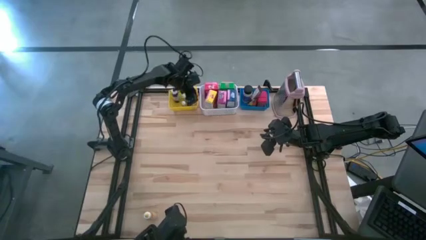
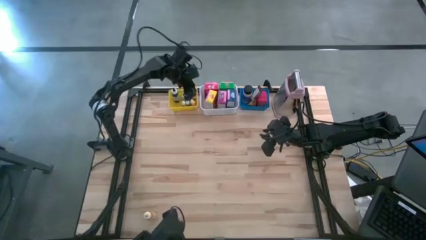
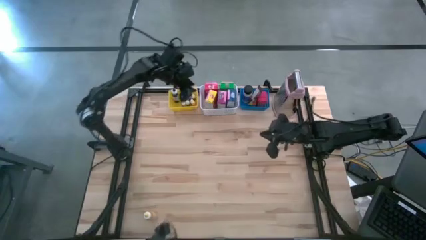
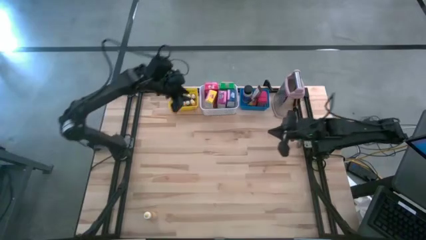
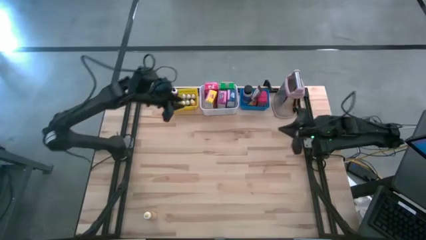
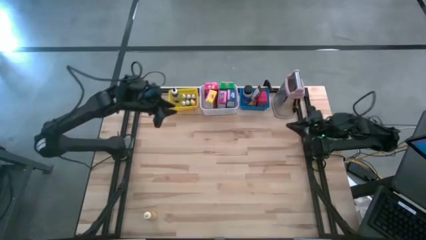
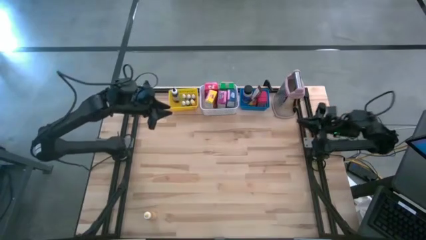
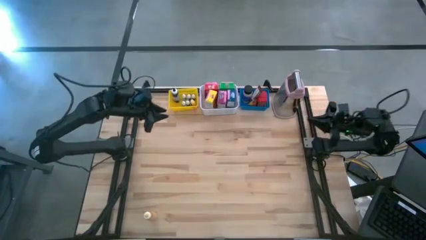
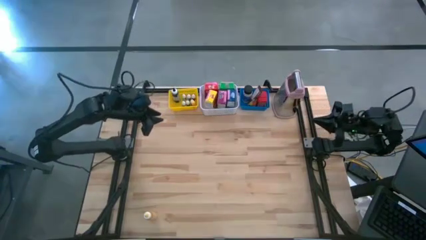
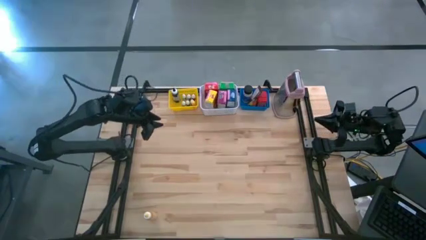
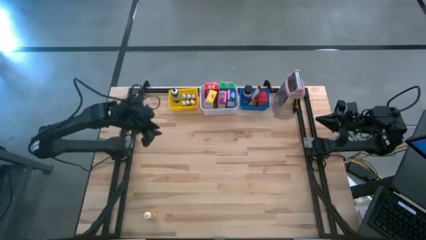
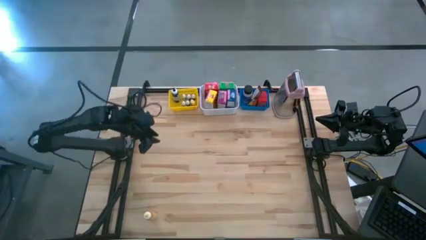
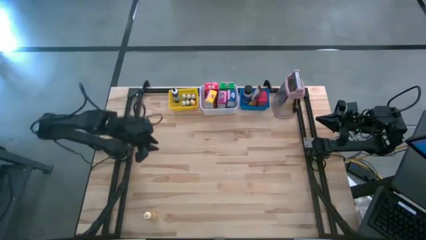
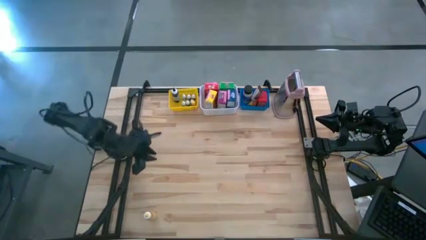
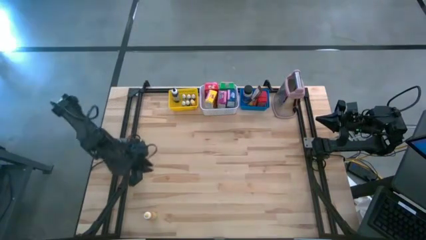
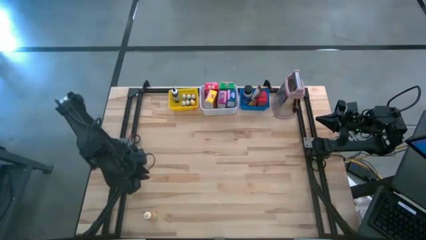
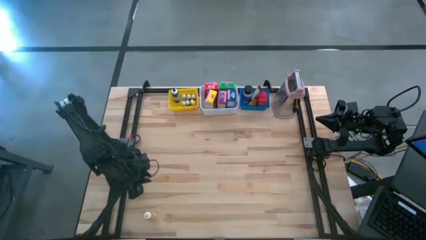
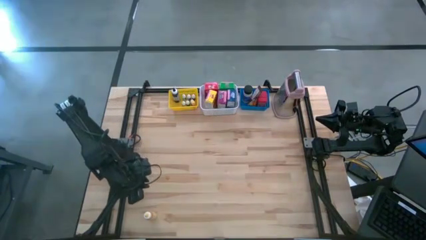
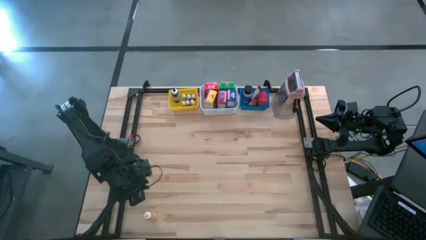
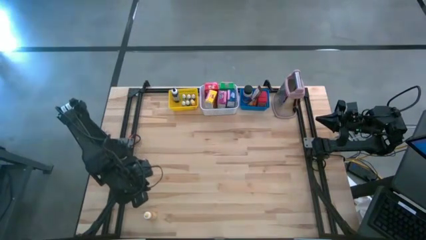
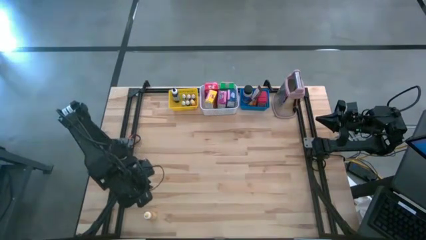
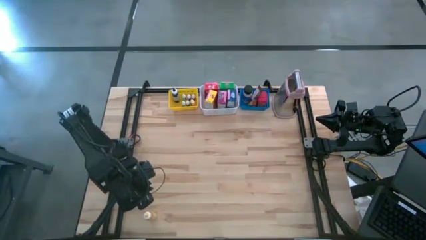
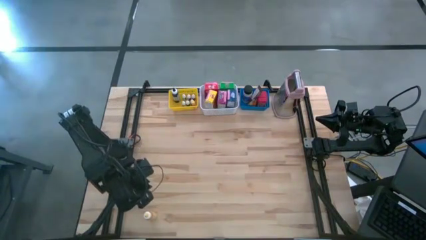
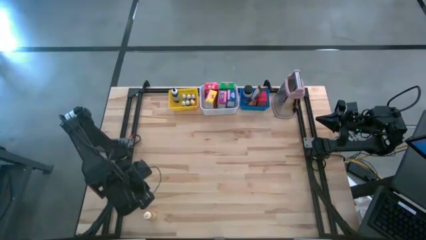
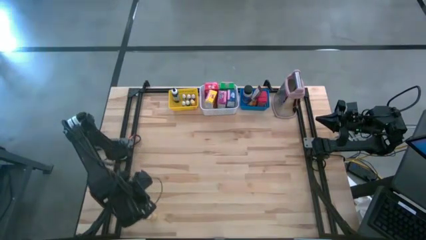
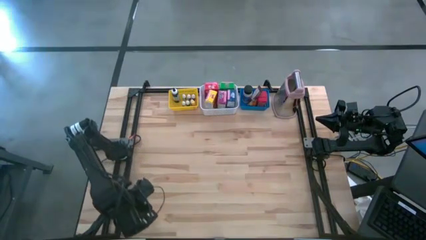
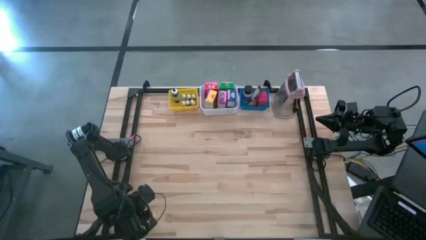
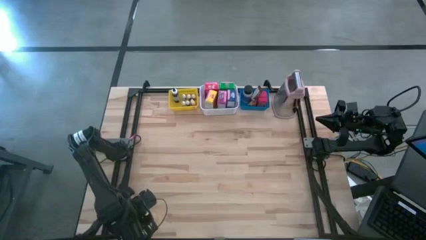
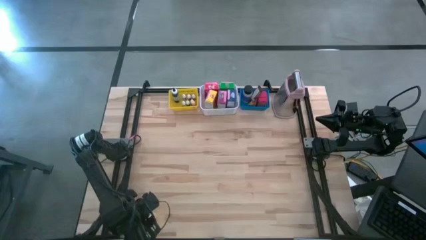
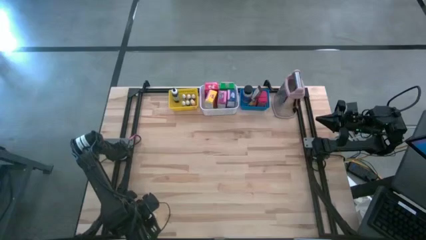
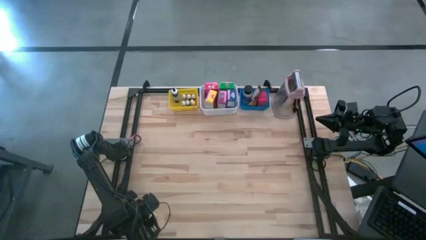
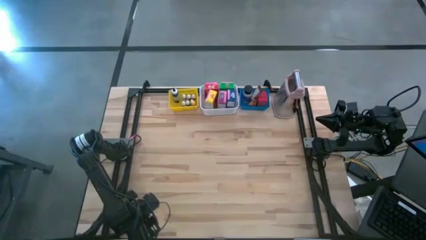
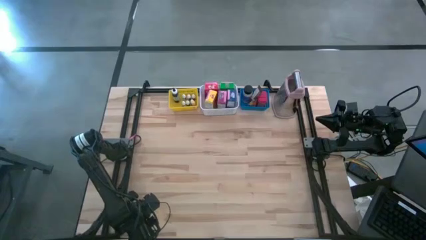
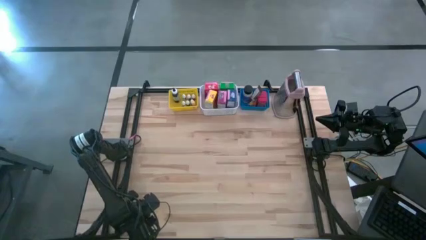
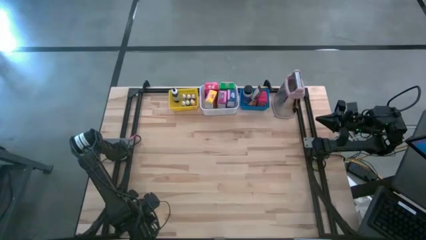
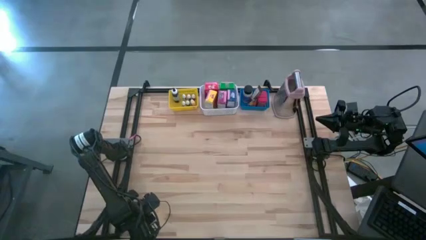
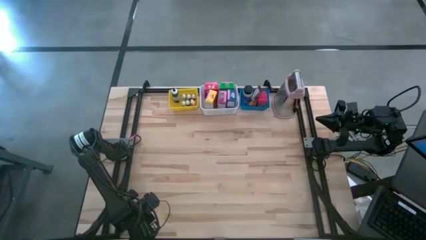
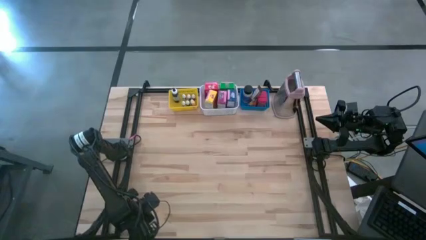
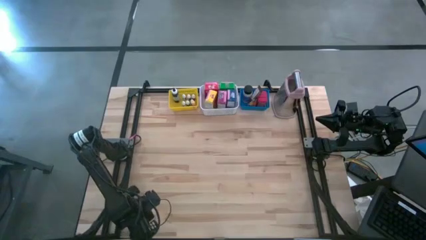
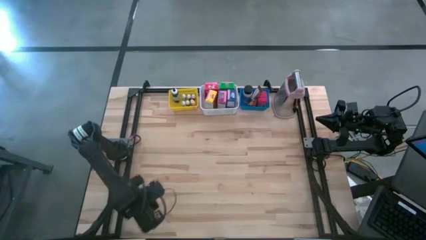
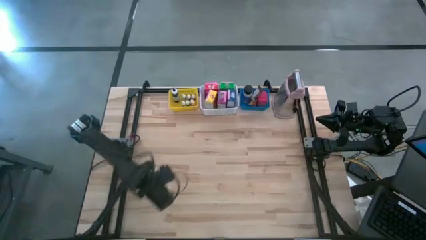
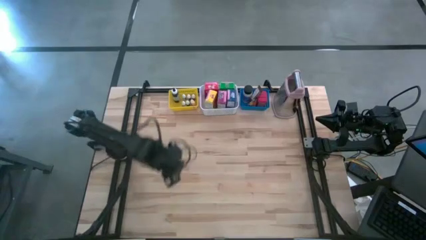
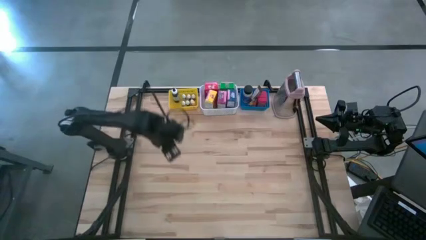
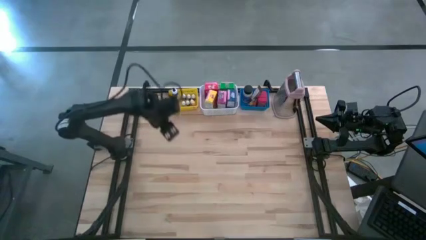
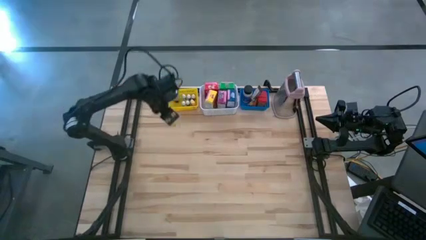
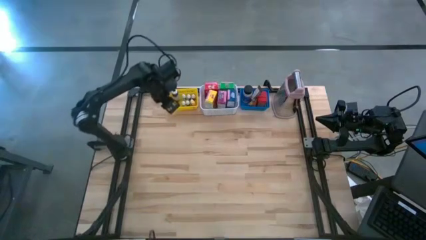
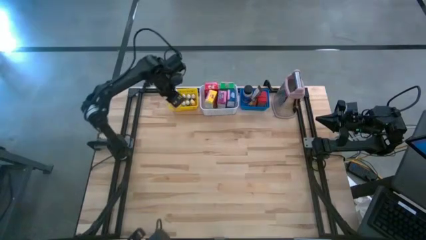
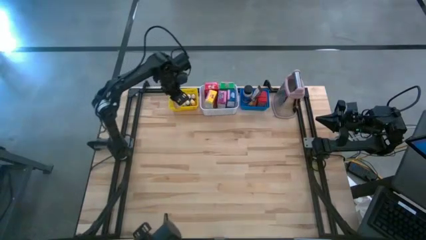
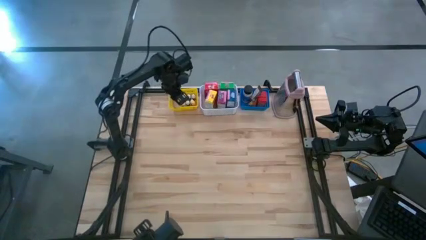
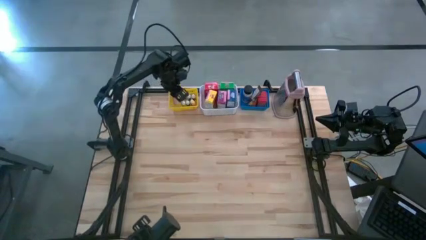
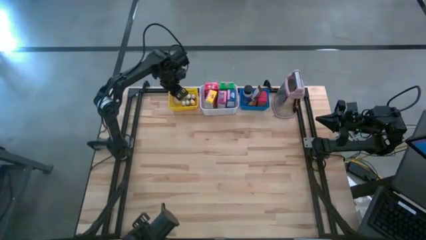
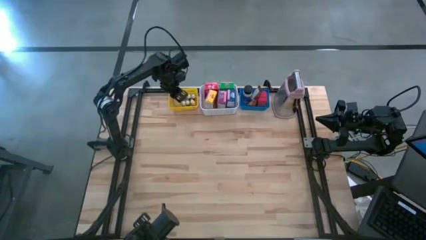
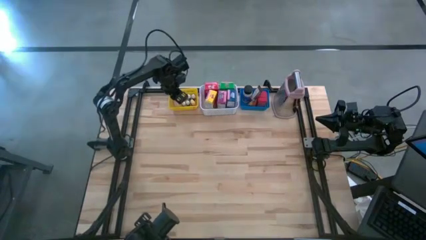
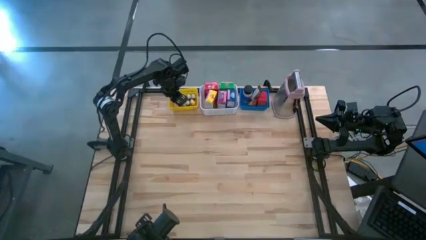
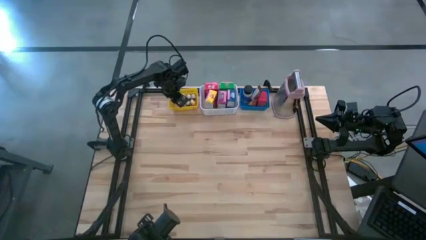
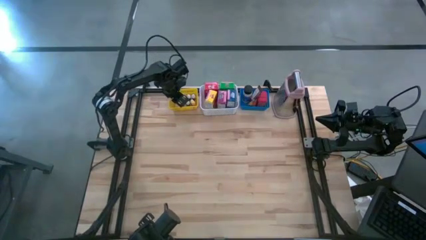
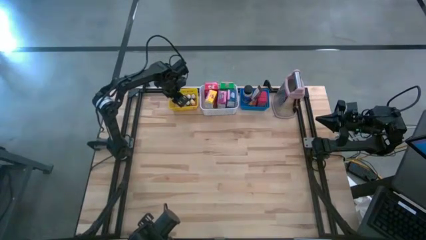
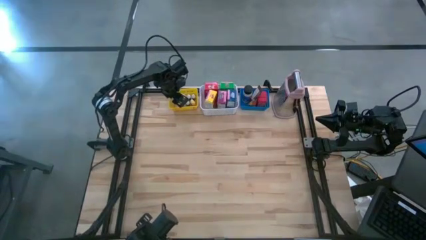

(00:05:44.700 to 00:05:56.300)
Task: Pick & Place Kitchen Items
Put the yellow food coloring bottle into the yellow basket

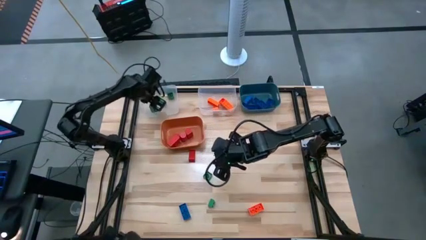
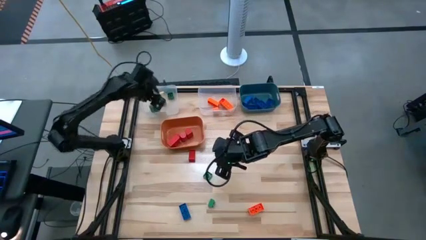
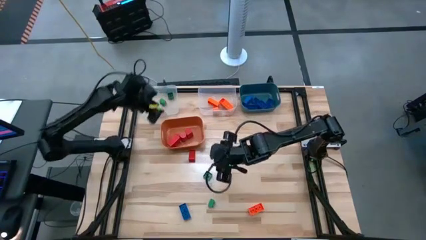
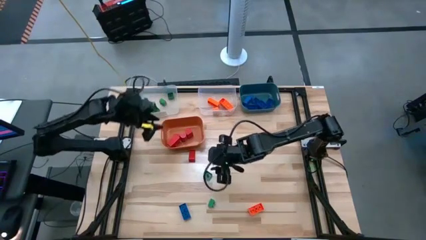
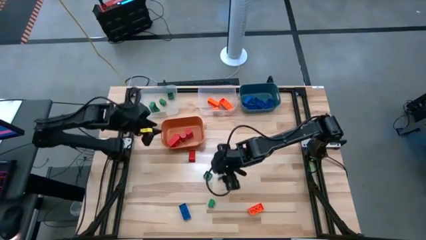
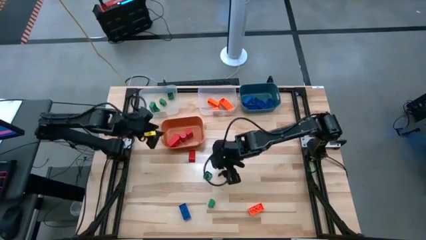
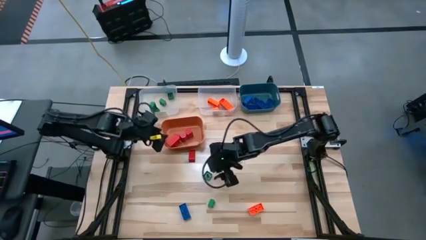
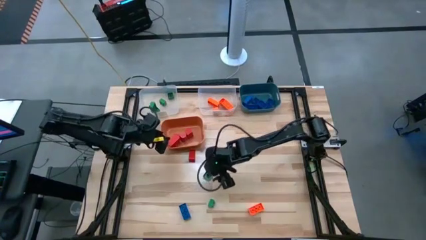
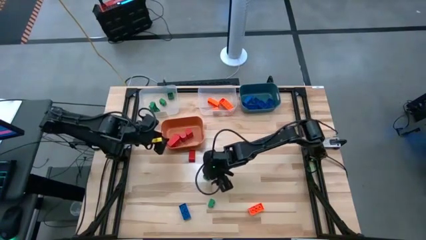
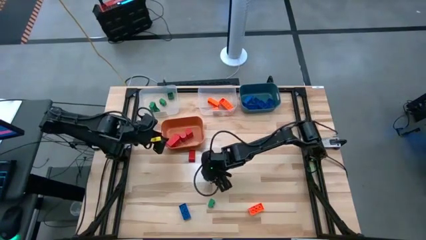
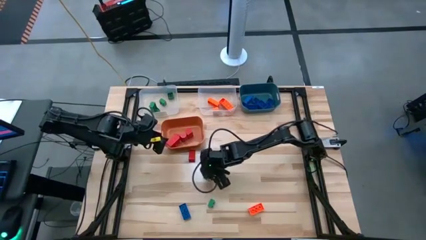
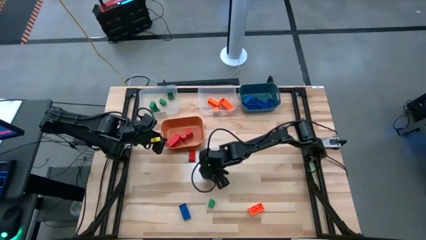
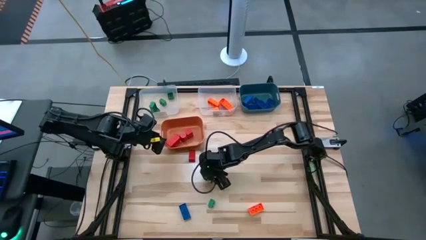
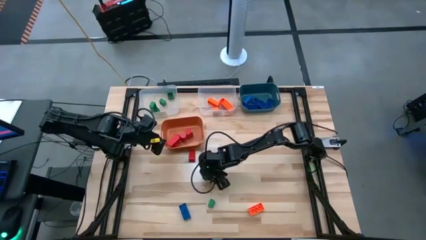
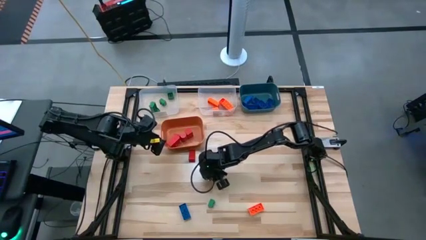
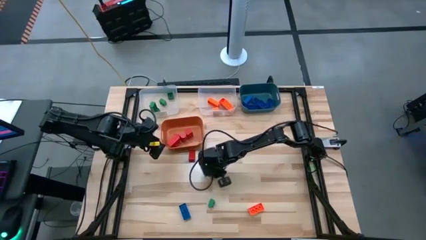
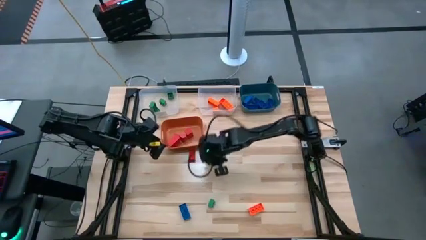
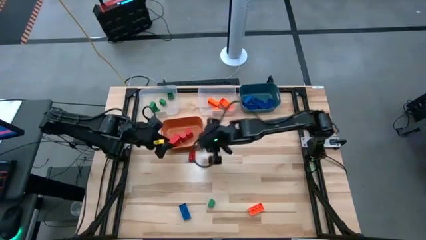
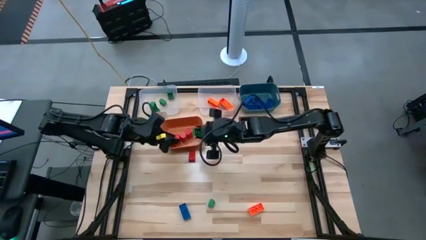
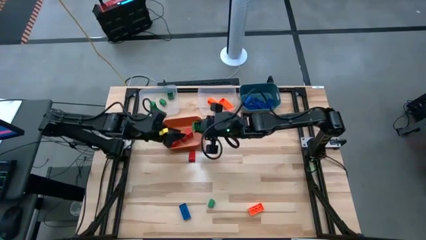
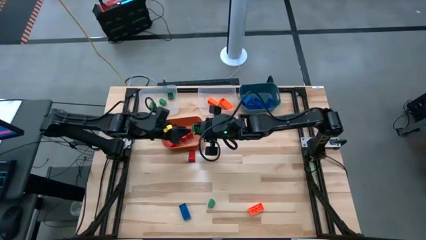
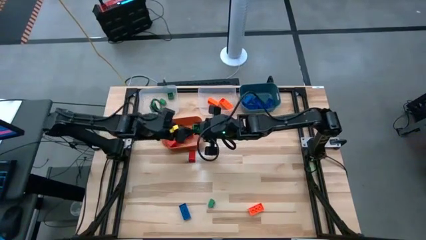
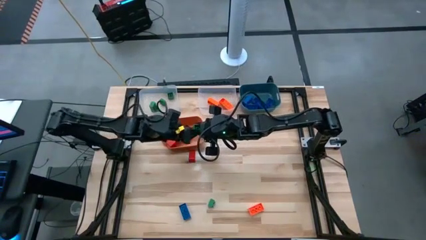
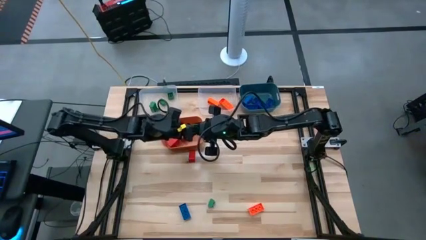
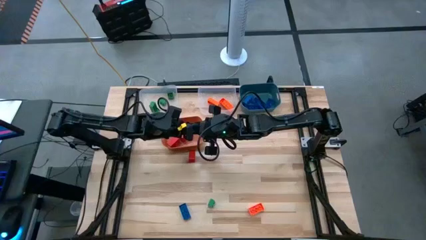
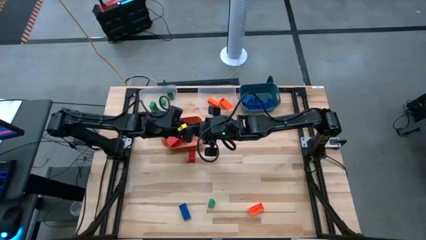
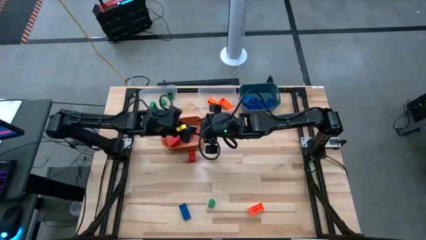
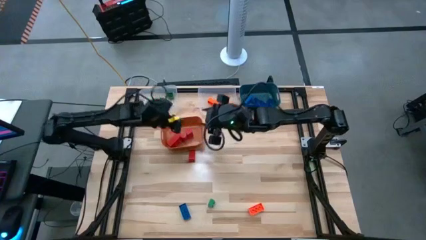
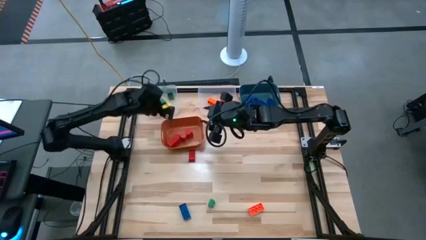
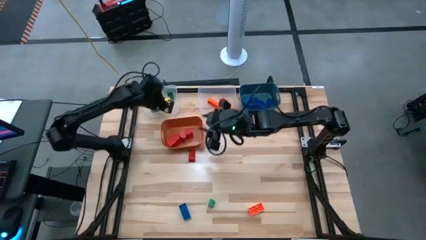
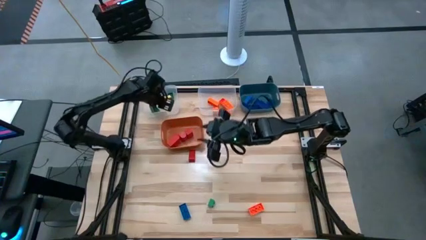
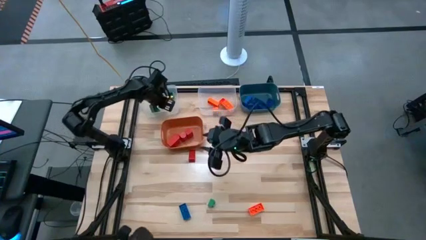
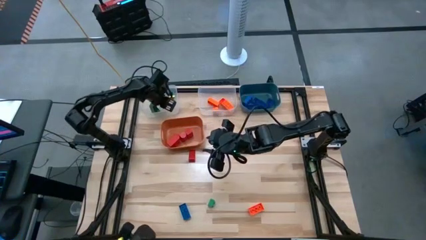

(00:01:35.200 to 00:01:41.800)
Task: Sort blocks
Put the green game piece into the left transparent bin
